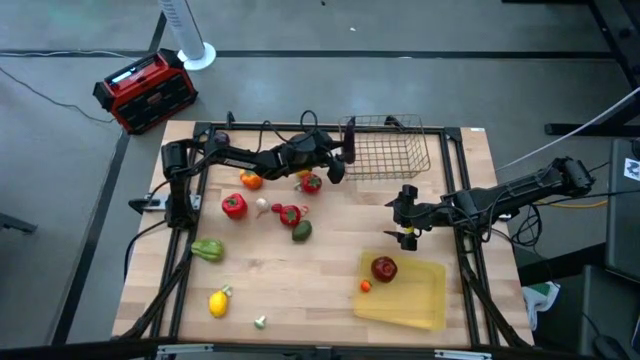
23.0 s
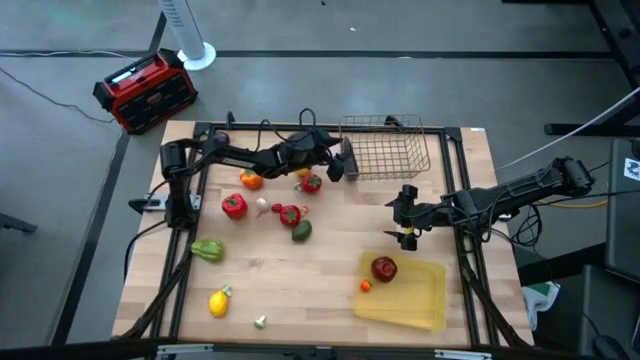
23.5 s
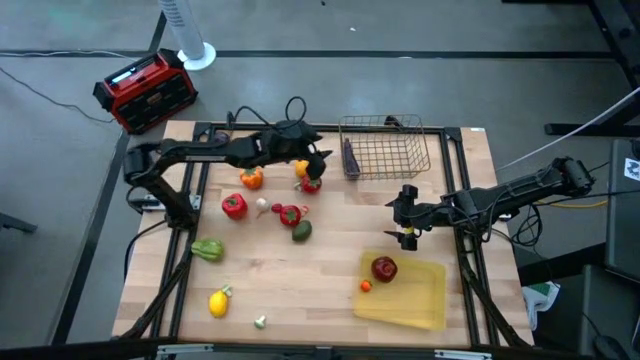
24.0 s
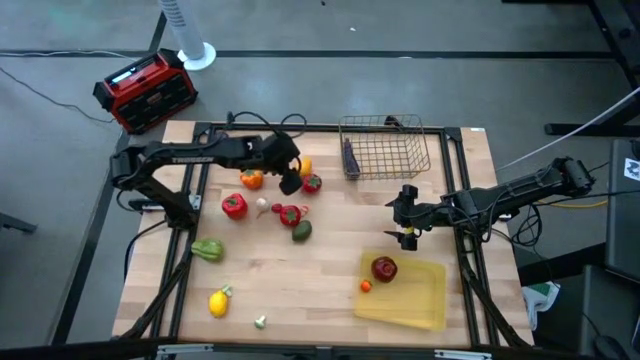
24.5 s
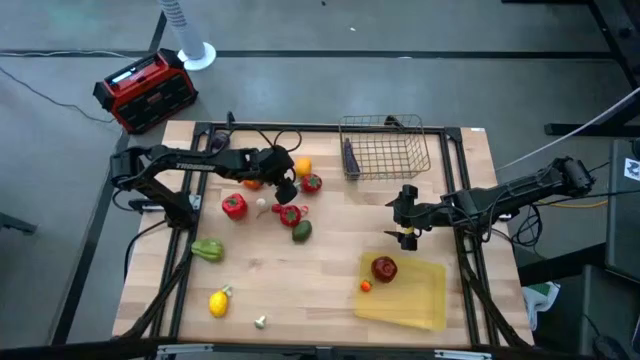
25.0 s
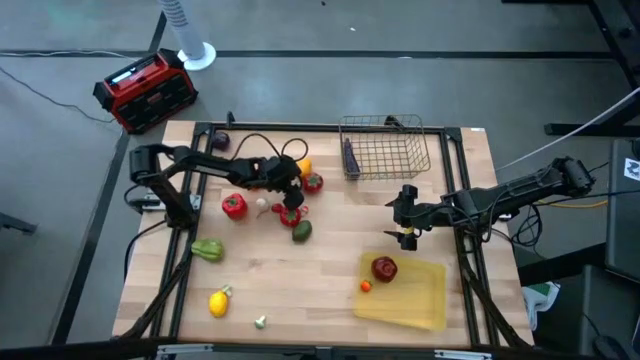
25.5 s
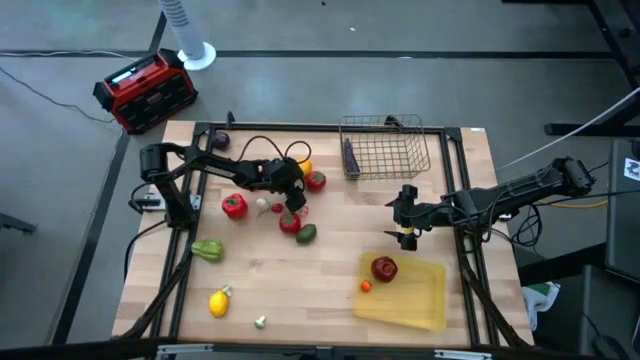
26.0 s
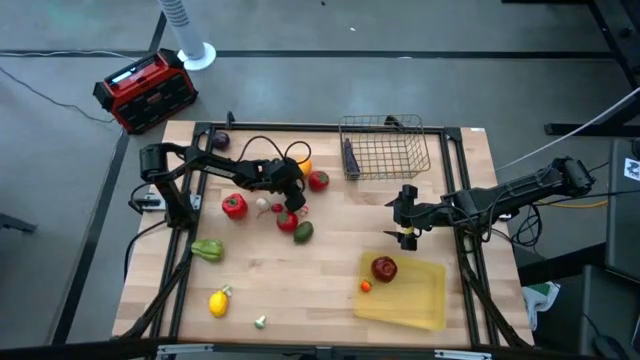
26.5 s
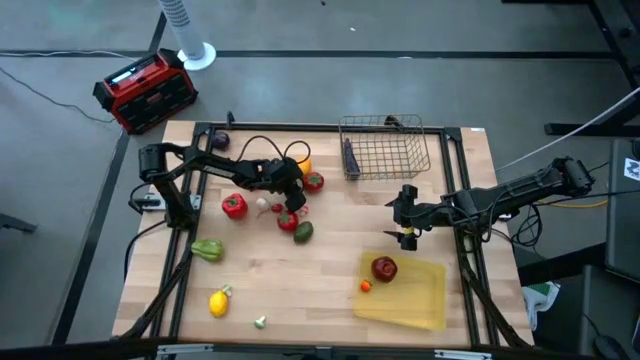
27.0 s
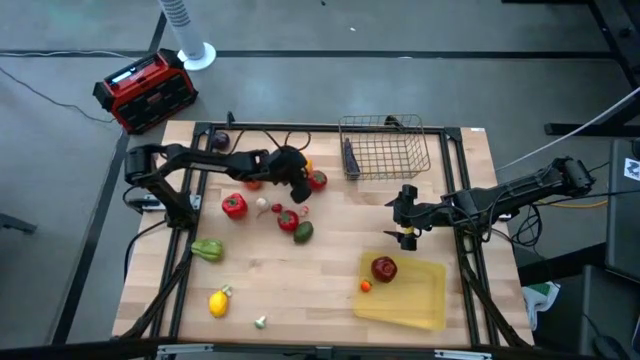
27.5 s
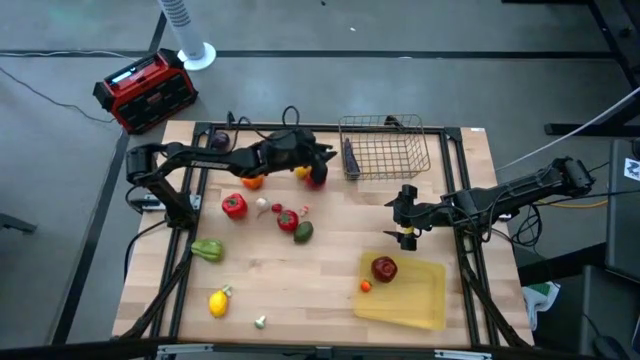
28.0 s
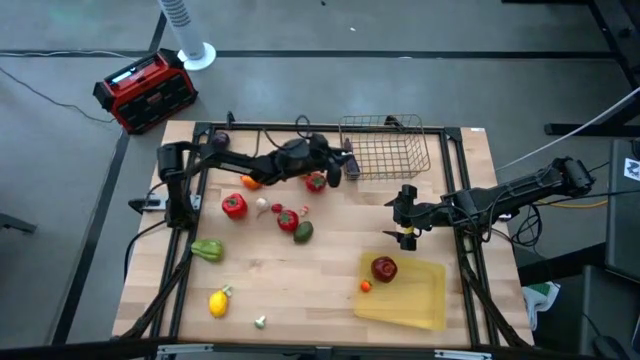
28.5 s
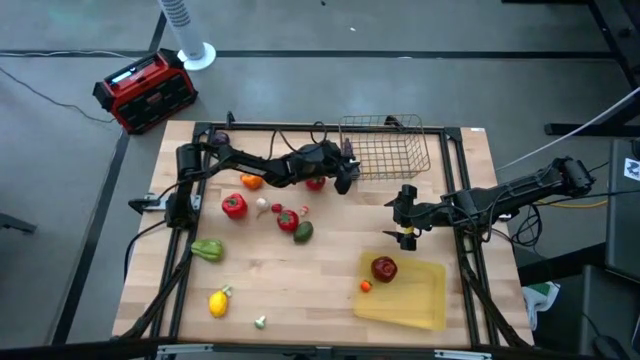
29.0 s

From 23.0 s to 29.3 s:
Task: Sort produce into baskets
Put the top green mushroom into the wire basket

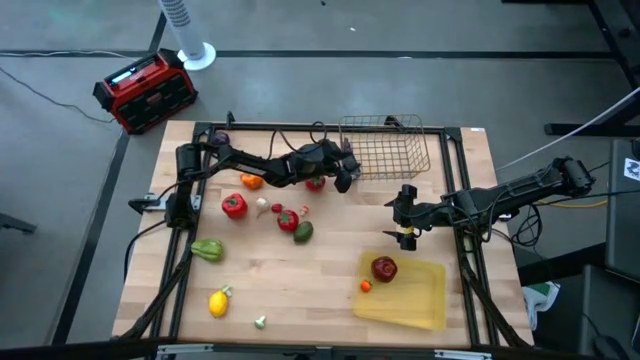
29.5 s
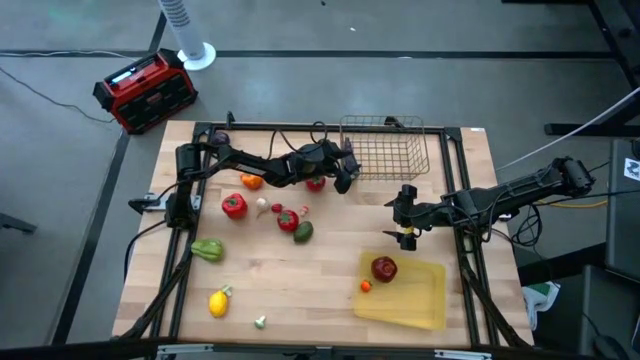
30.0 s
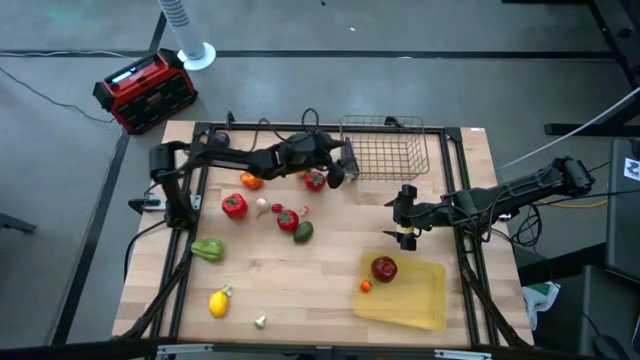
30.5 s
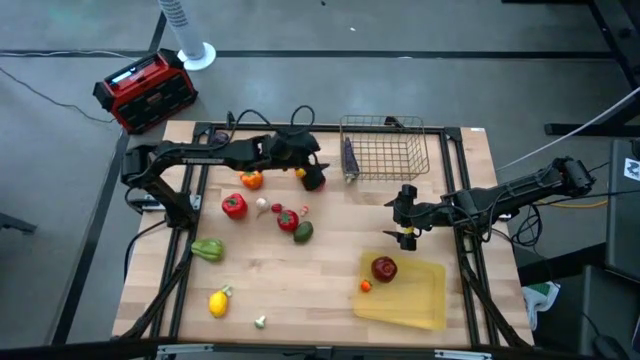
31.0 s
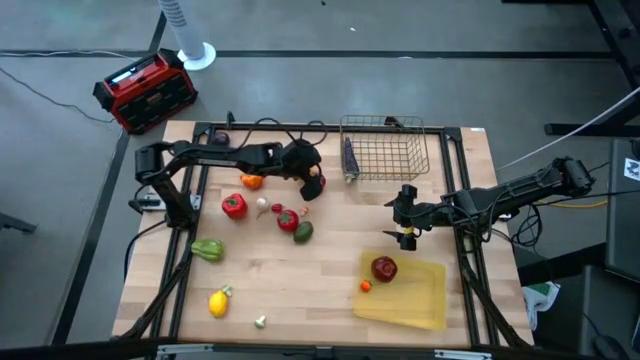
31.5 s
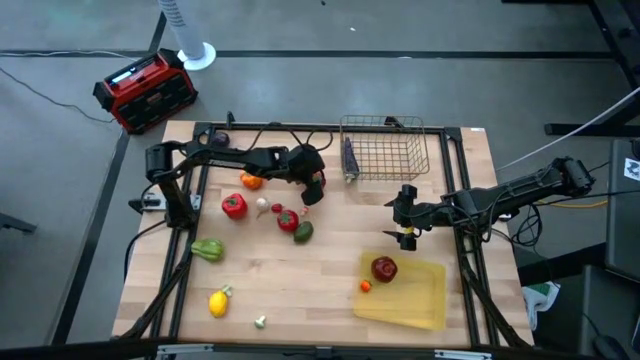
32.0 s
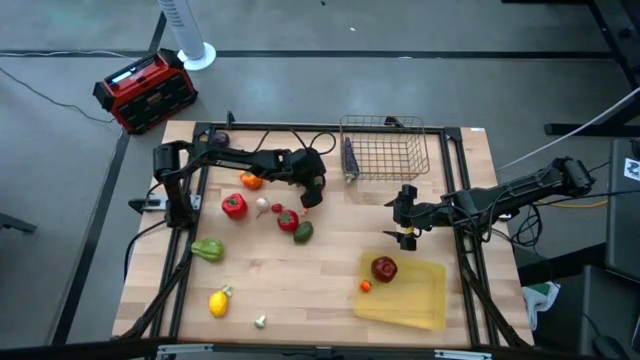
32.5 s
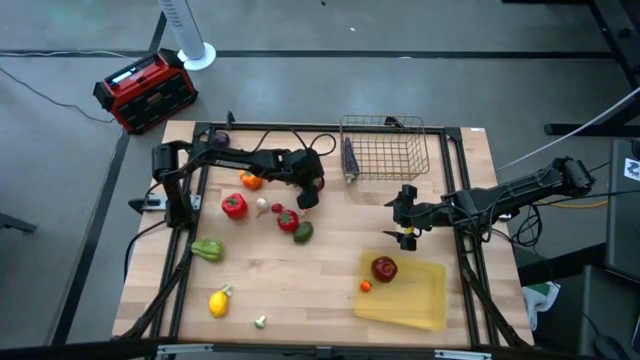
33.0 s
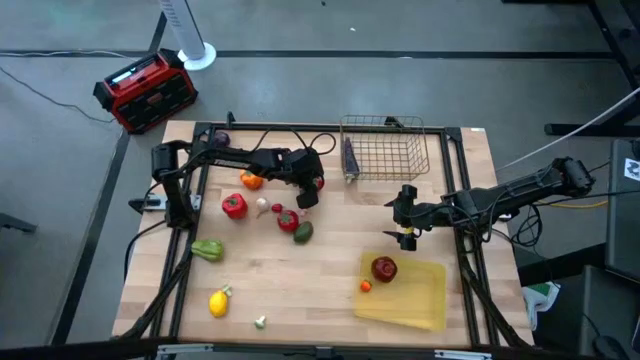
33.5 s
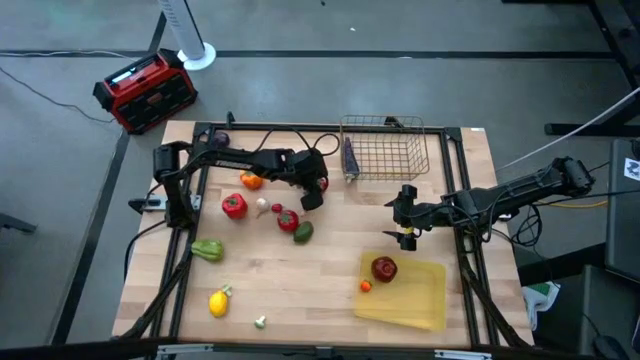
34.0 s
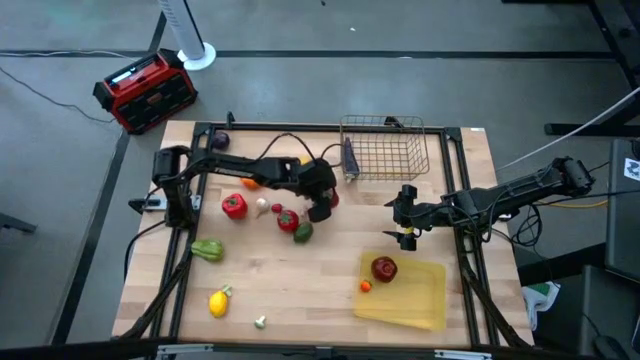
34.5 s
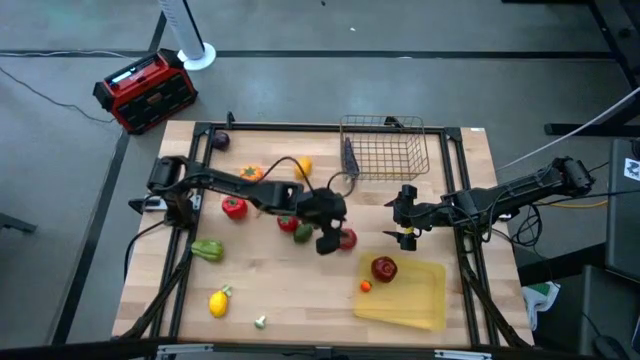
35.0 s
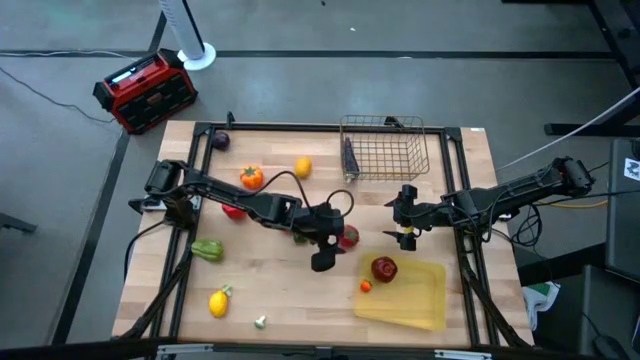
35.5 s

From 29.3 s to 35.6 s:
Put the top red tomato into the yellow bin

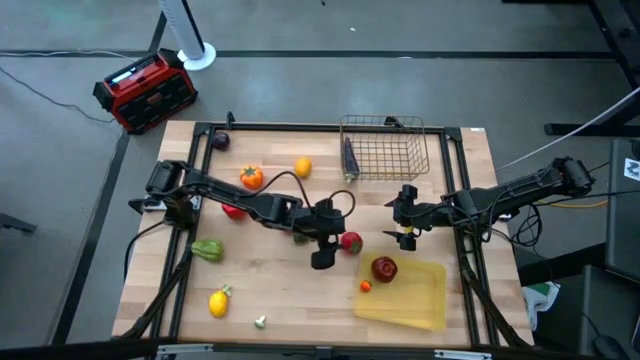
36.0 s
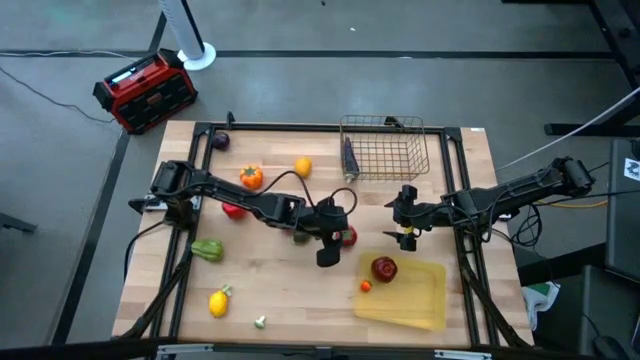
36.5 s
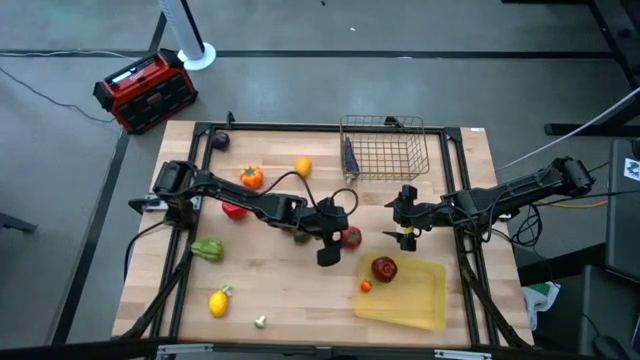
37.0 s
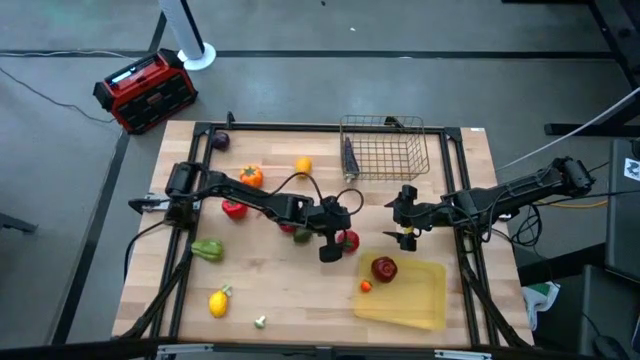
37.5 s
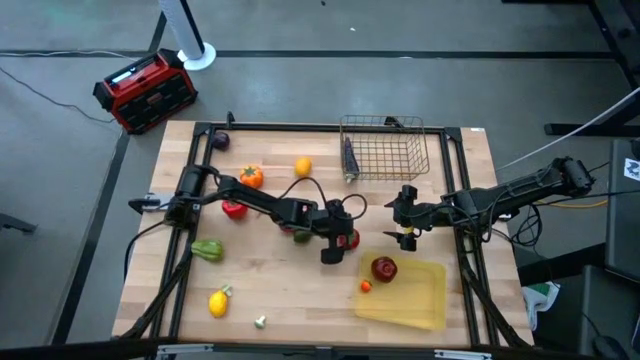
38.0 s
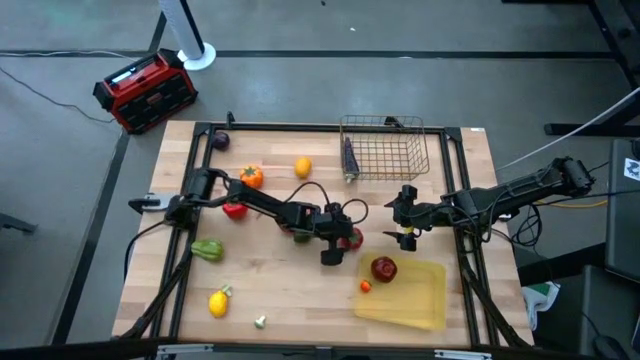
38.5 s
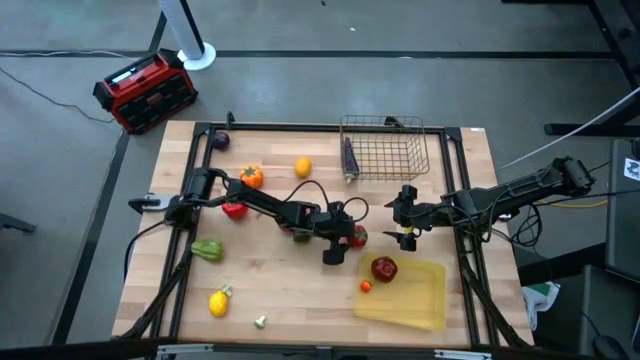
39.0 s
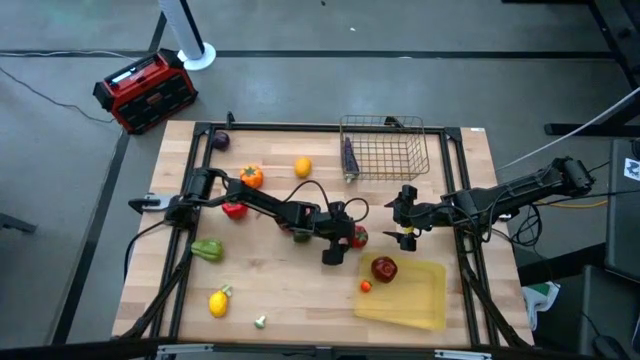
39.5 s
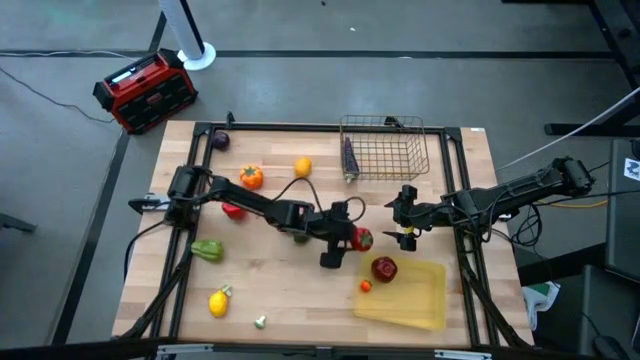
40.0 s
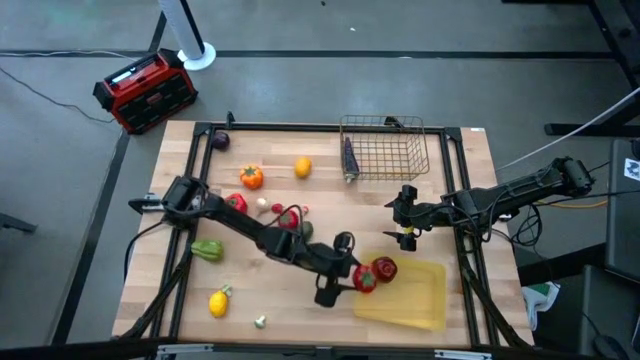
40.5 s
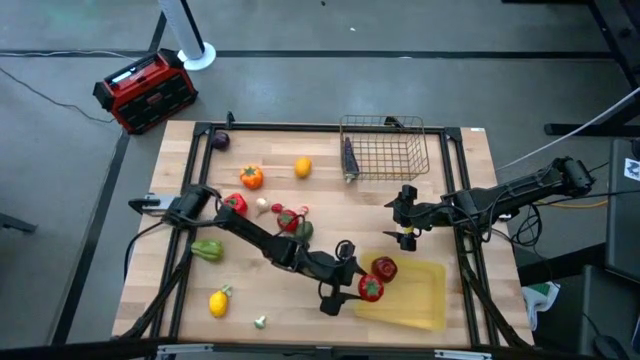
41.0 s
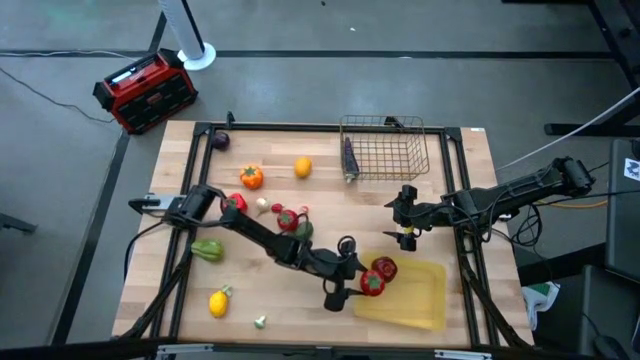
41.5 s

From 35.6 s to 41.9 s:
Put the top red tomato into the yellow bin
